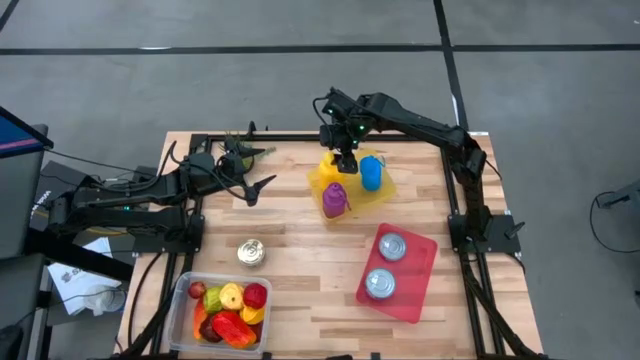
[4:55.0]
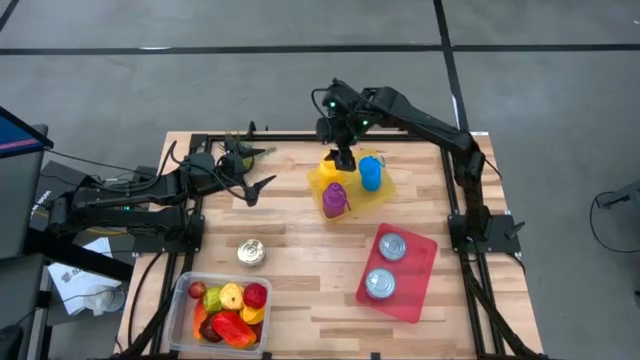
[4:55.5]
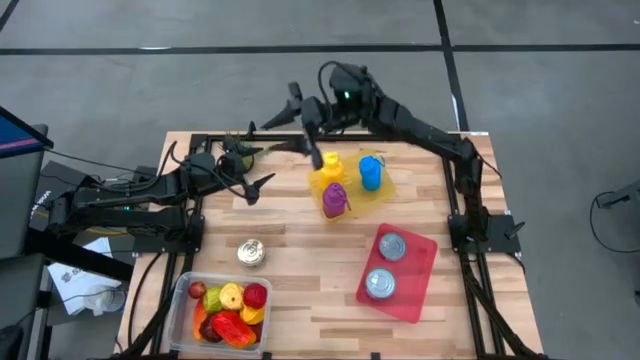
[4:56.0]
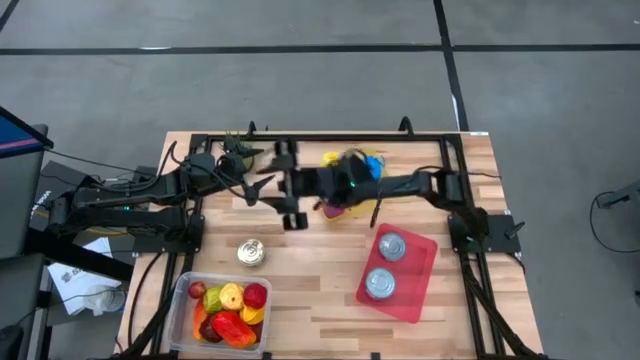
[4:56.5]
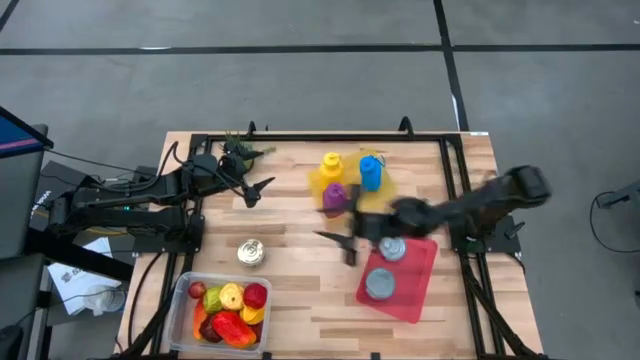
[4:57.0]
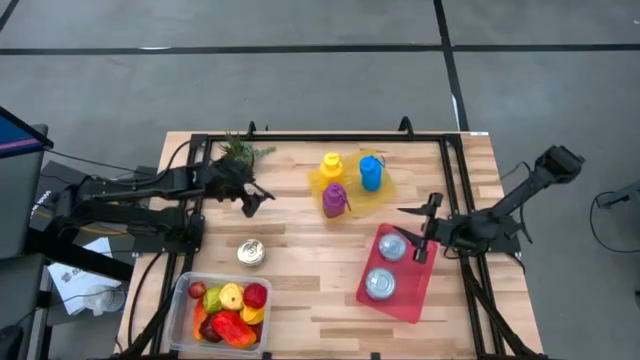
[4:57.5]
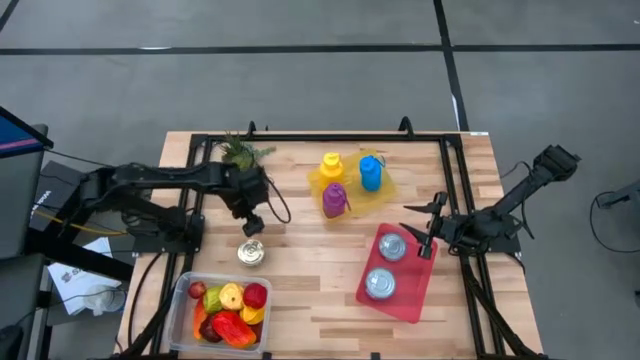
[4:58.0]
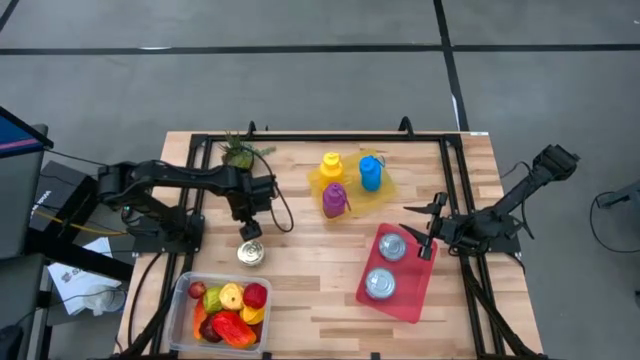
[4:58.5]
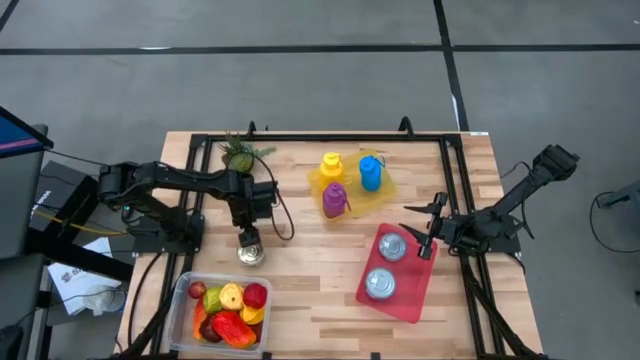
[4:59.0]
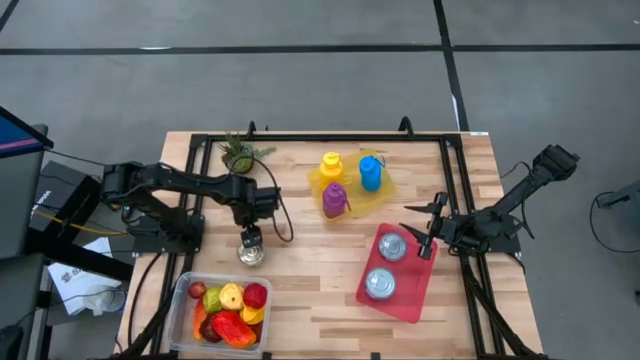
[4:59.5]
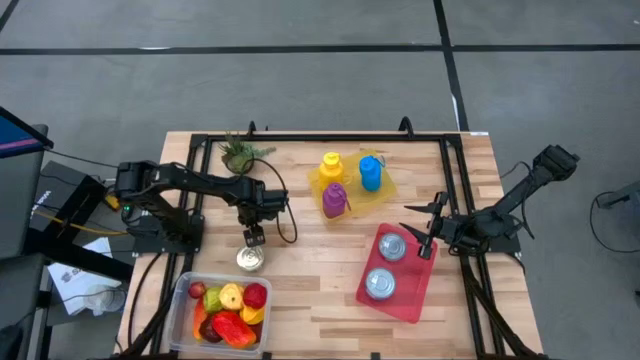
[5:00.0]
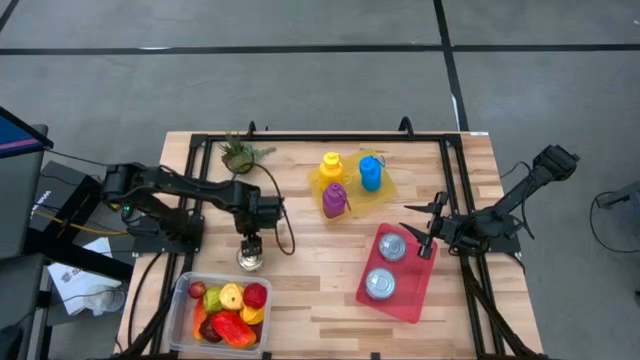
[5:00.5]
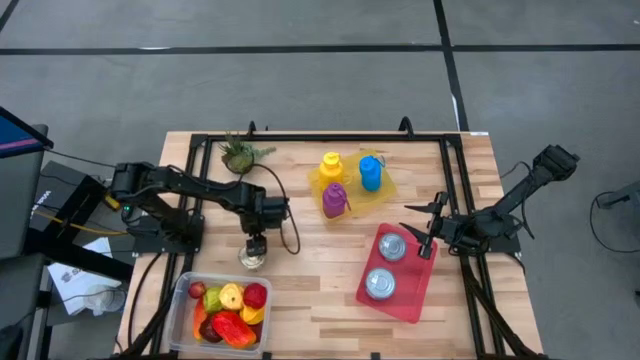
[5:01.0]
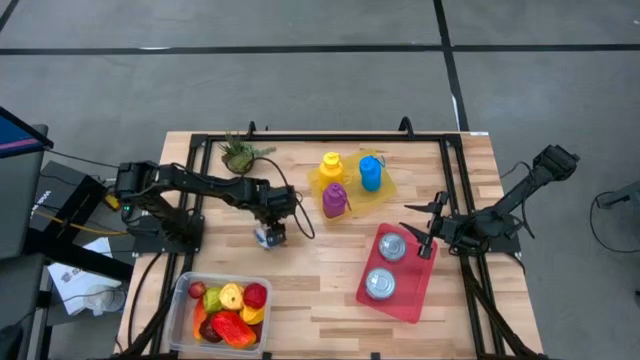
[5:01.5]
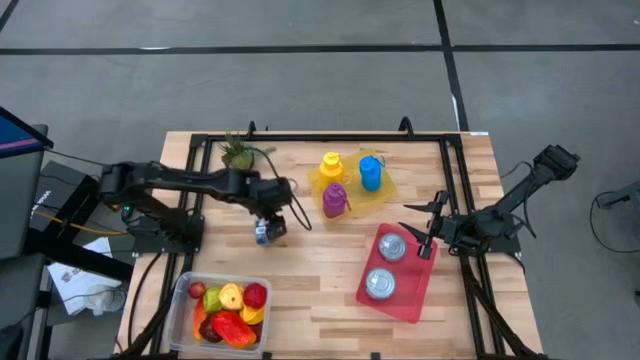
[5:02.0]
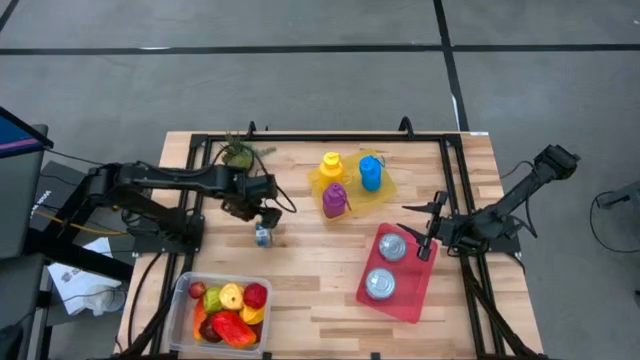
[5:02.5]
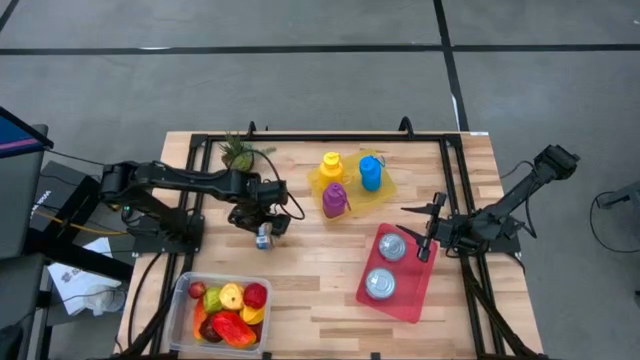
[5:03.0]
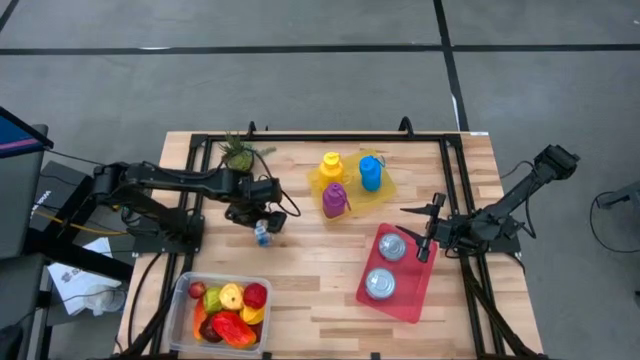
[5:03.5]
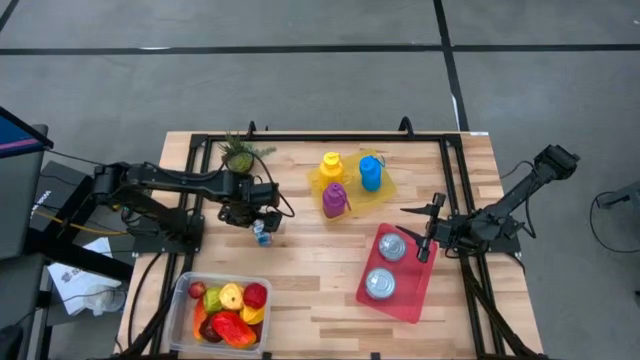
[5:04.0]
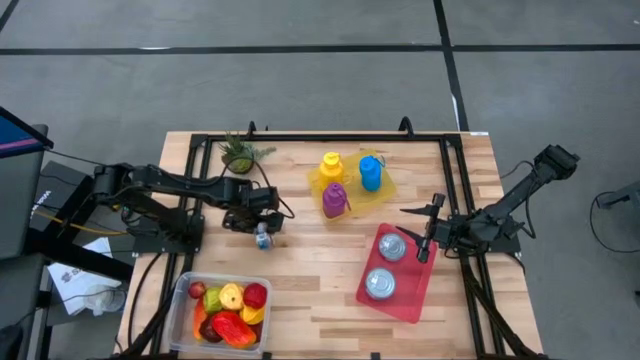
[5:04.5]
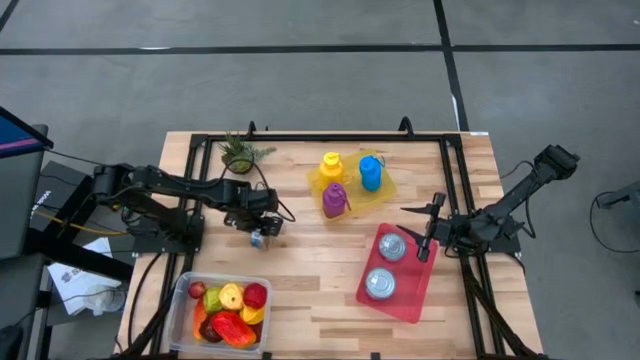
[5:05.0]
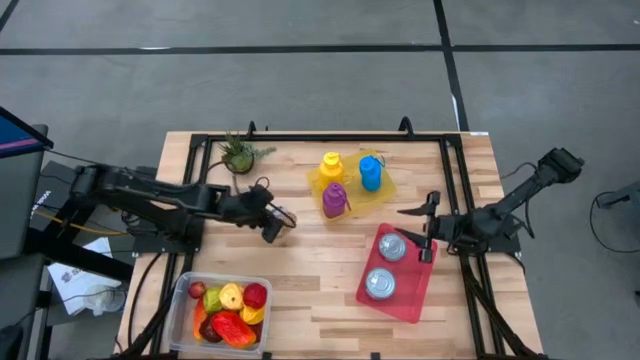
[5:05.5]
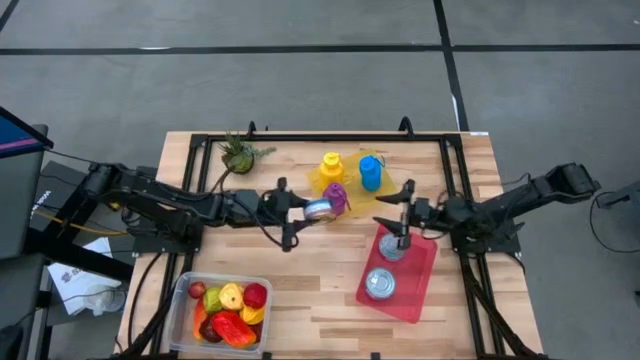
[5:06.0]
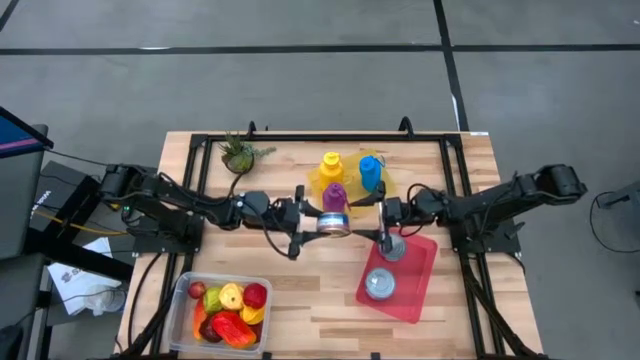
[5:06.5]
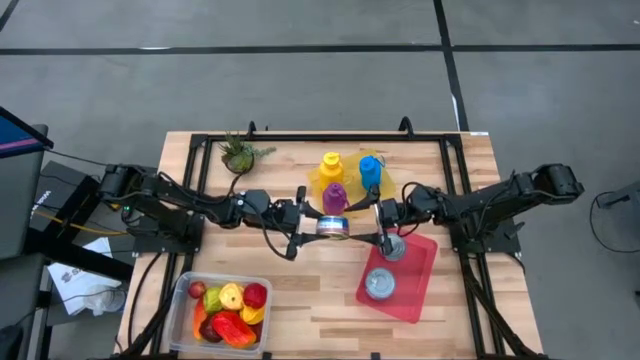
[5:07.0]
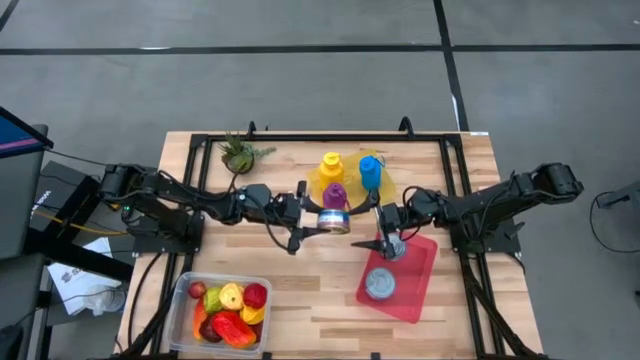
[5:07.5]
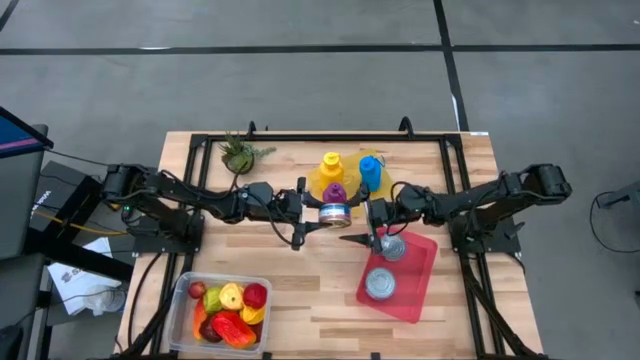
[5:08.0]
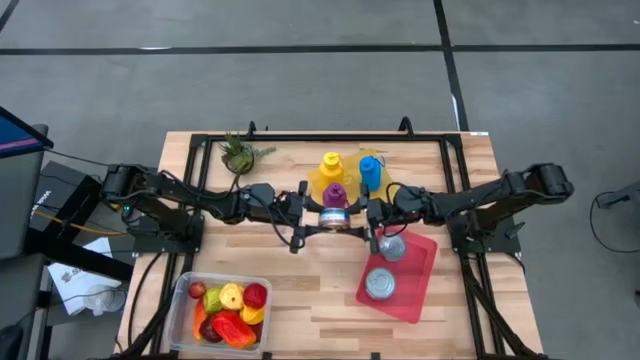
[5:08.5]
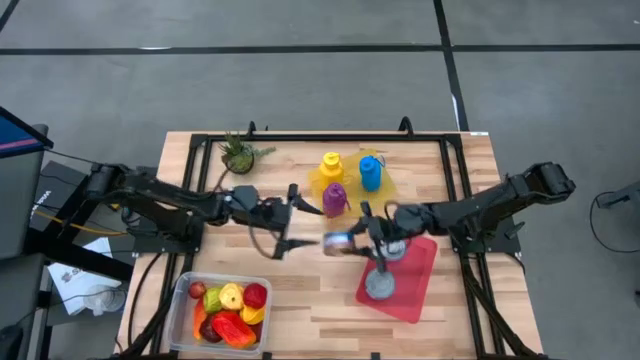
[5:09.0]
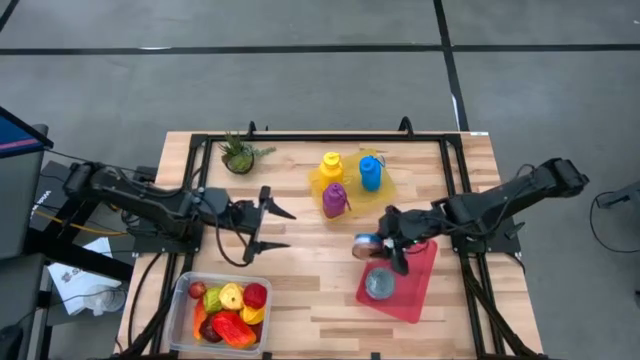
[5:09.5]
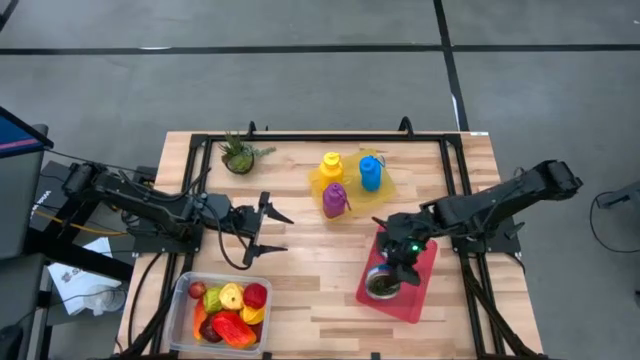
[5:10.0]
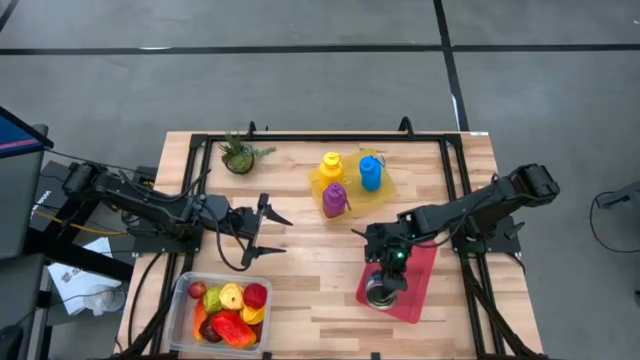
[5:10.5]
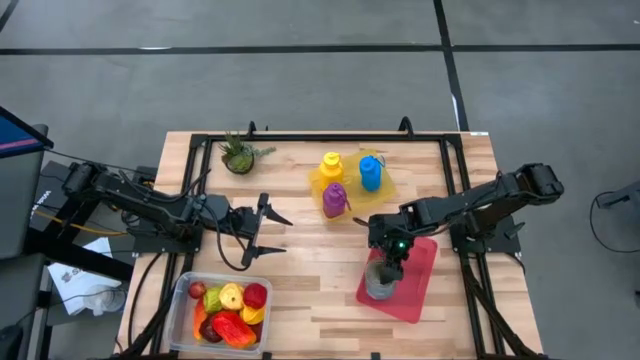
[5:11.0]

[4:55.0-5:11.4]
Task: Pick & Place Food Item
Put the blue and pink tuna can into the red bin

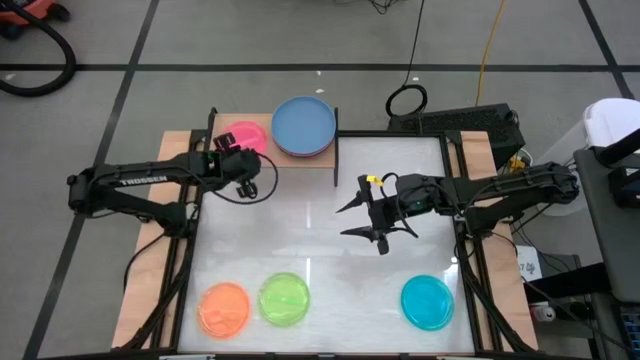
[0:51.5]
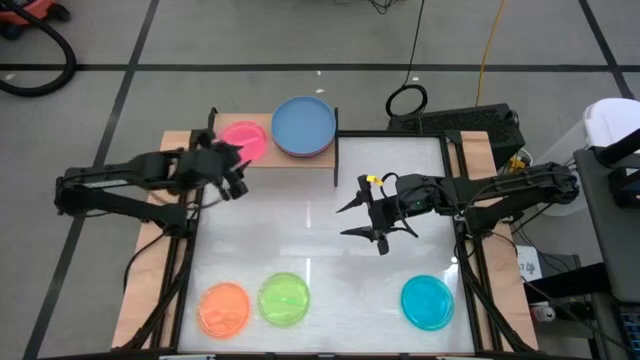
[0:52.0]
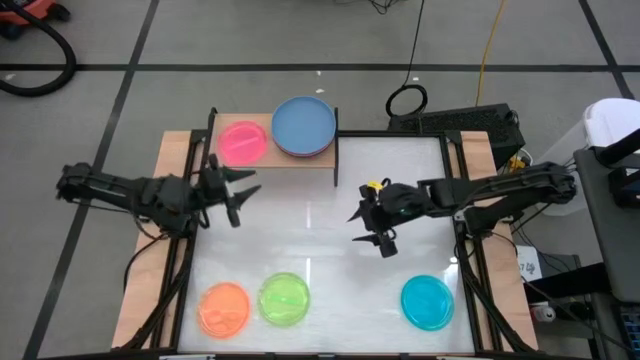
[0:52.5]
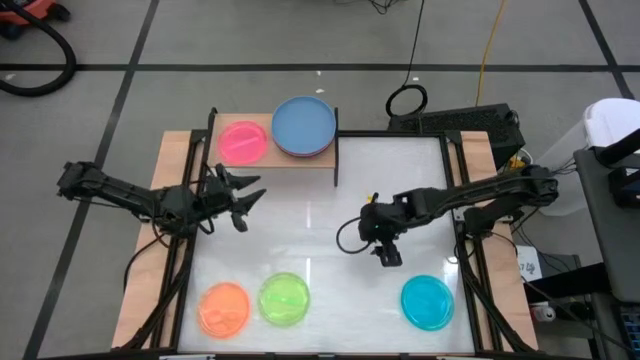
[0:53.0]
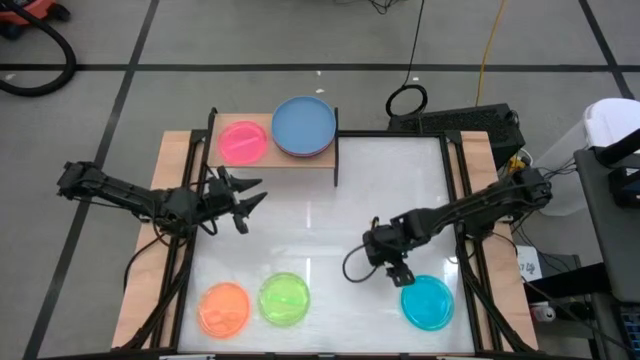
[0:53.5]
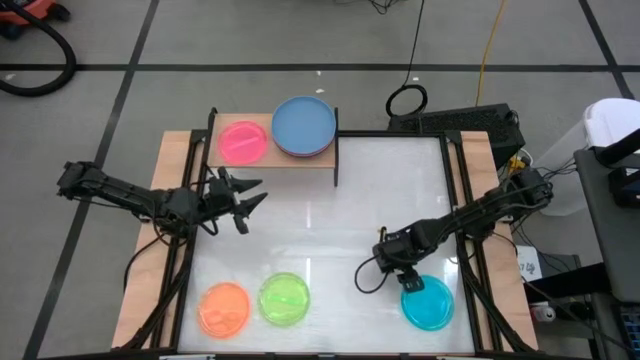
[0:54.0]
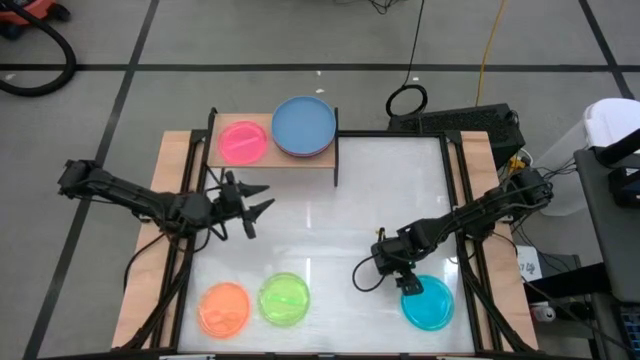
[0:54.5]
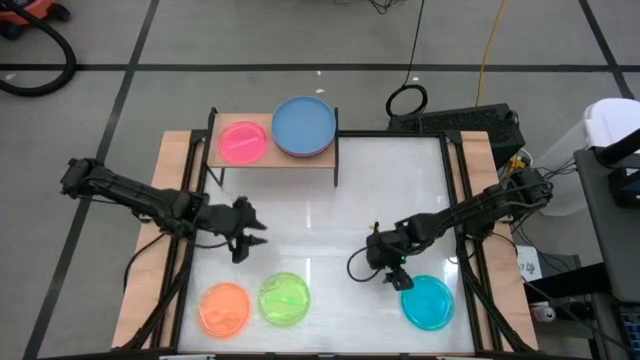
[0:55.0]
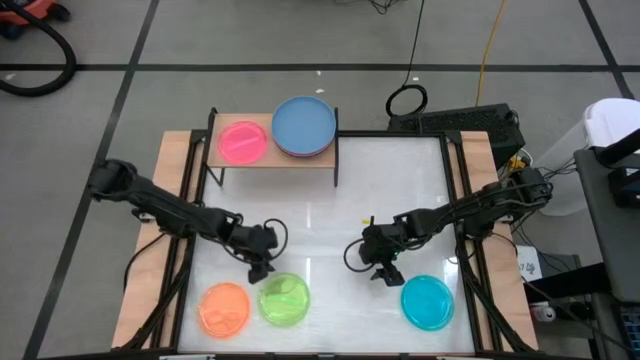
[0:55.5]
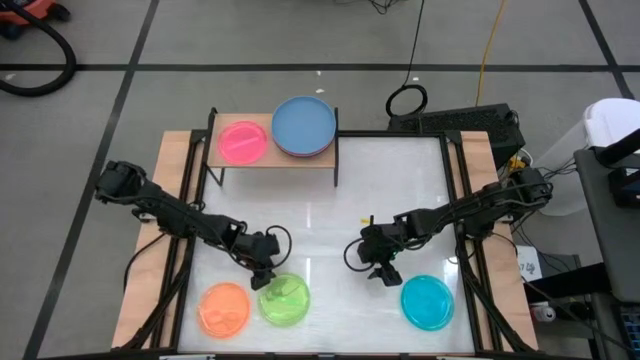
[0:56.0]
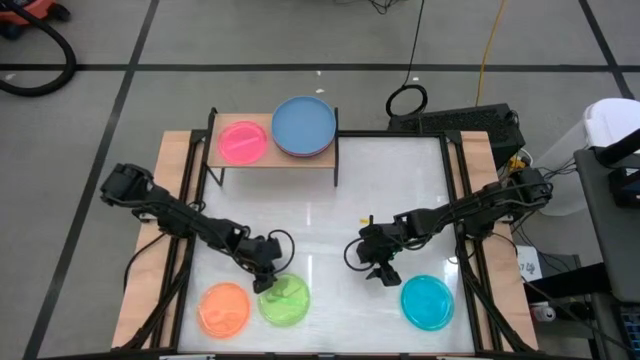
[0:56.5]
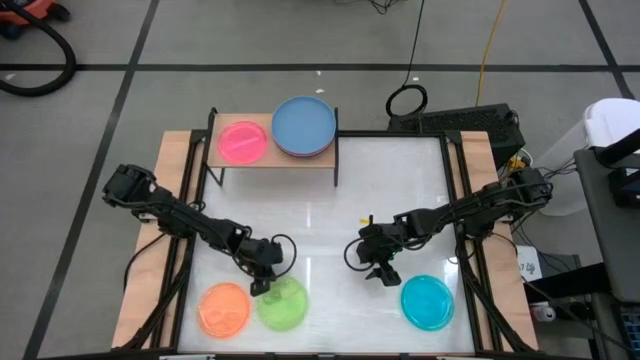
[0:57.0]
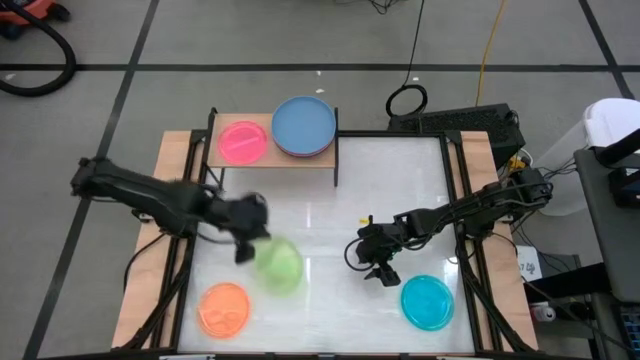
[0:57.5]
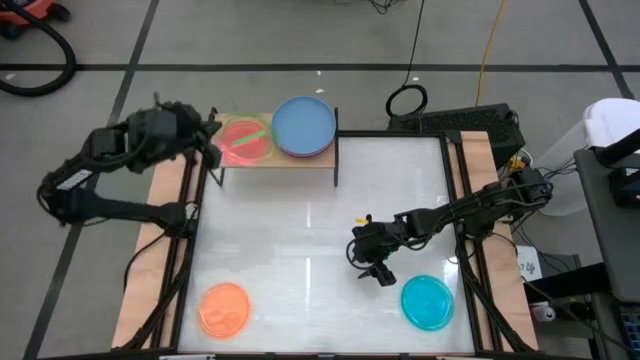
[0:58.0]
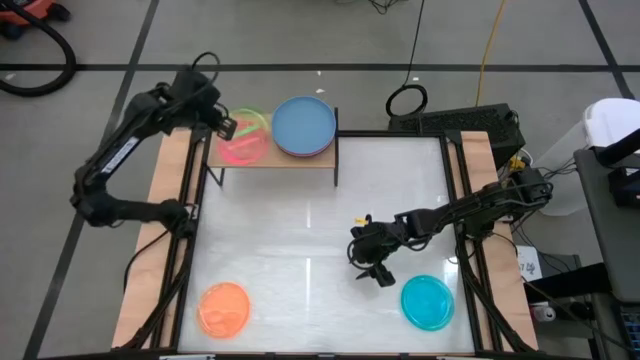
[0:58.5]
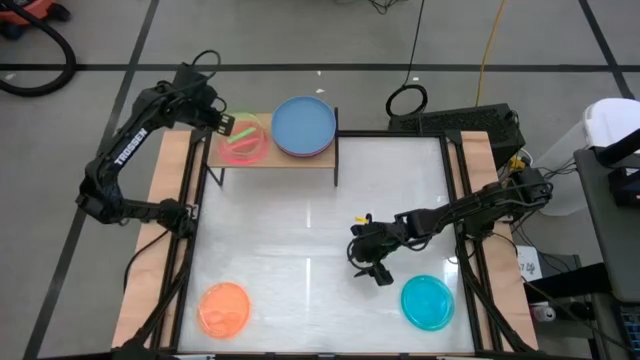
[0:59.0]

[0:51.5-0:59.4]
Task: Place and stack plates onto a shelf
Stack the transparent green plate on top of the pink plate on the shelf
